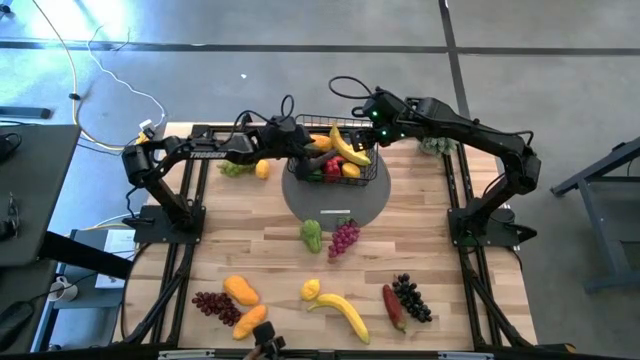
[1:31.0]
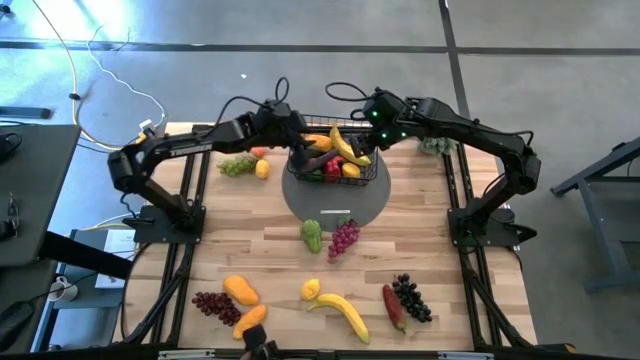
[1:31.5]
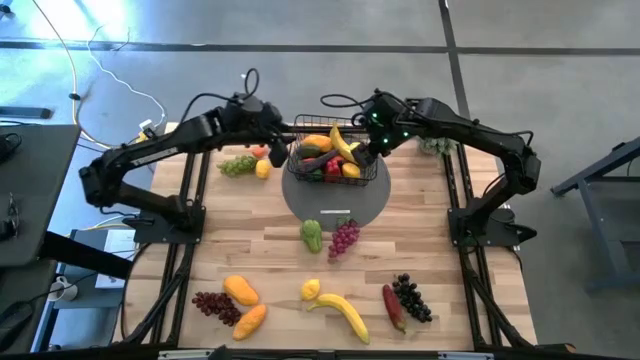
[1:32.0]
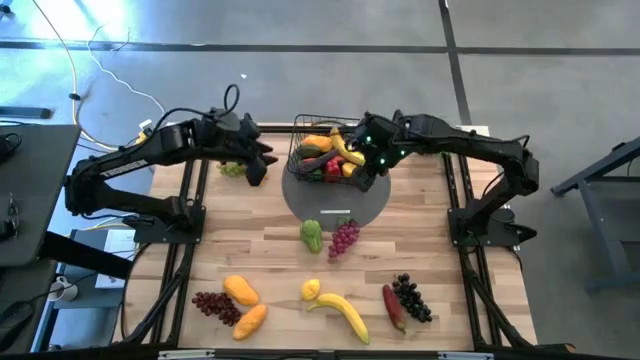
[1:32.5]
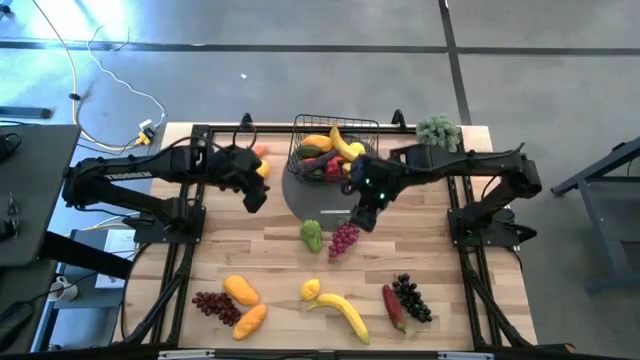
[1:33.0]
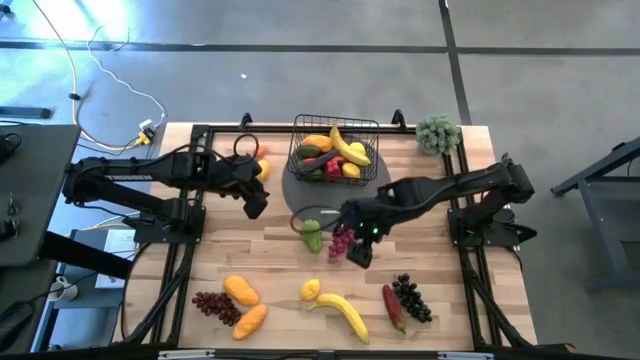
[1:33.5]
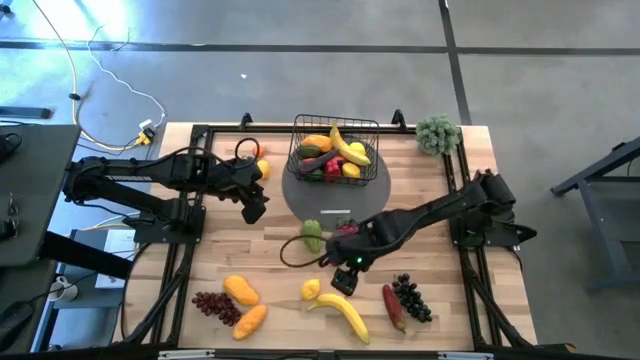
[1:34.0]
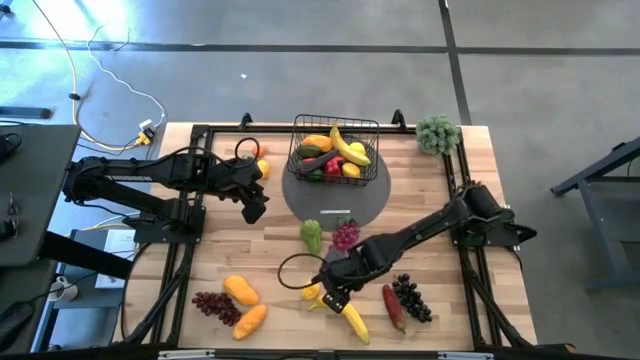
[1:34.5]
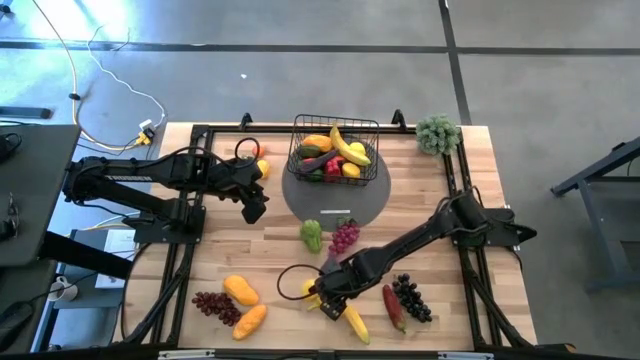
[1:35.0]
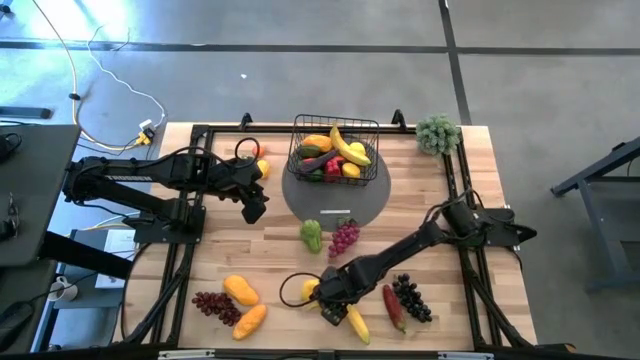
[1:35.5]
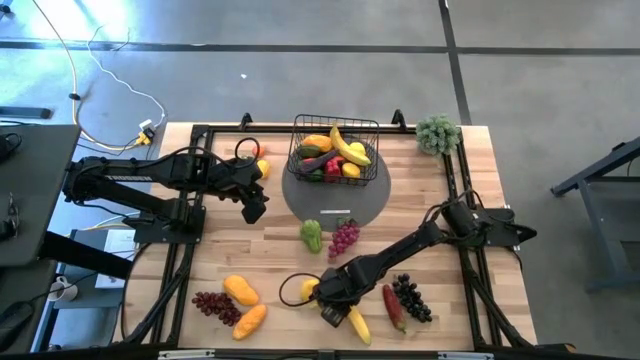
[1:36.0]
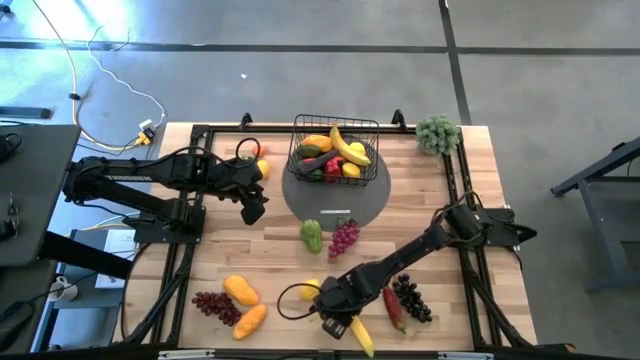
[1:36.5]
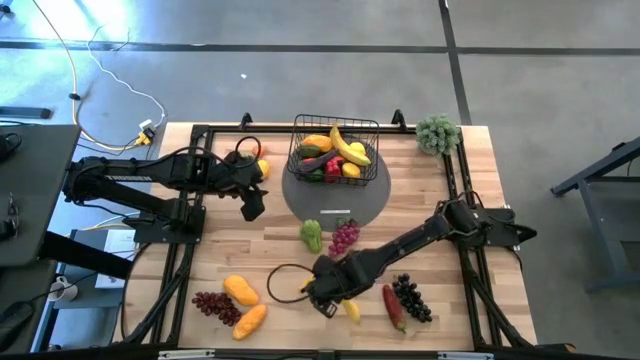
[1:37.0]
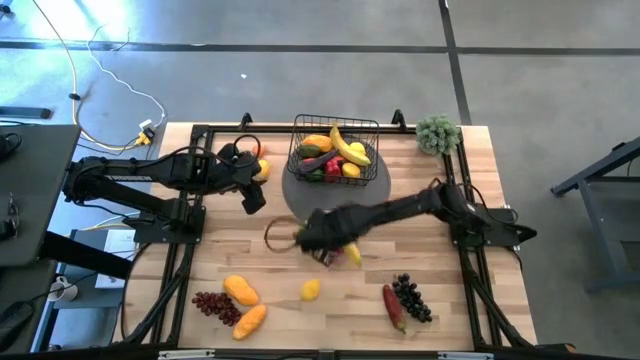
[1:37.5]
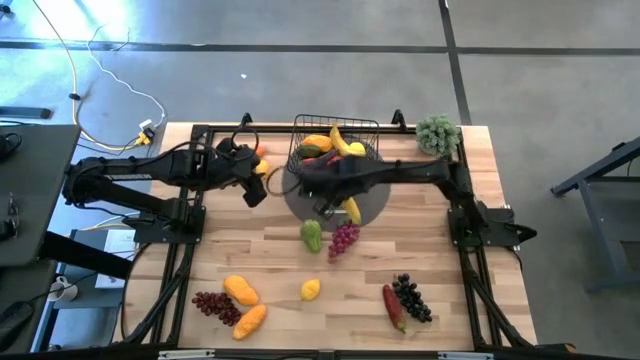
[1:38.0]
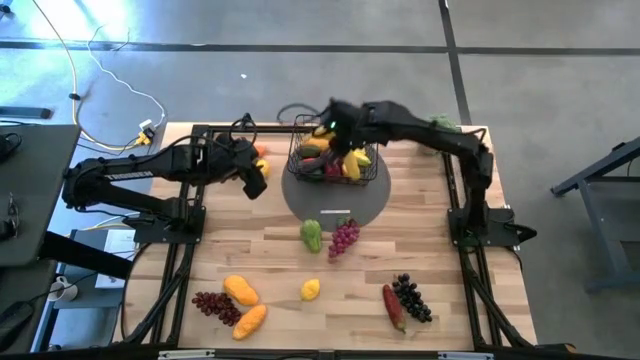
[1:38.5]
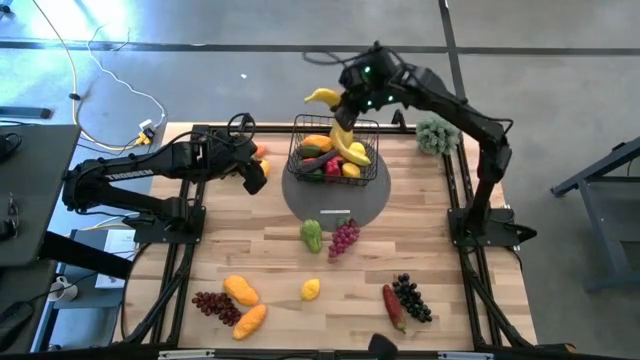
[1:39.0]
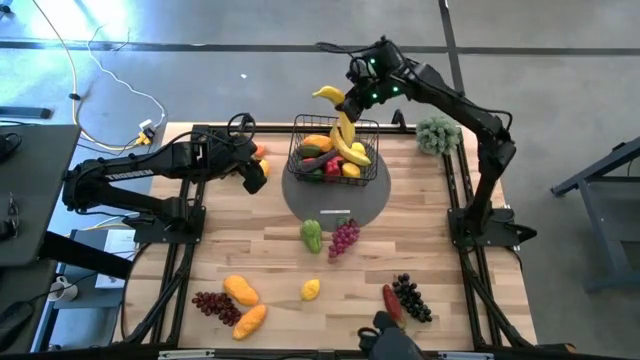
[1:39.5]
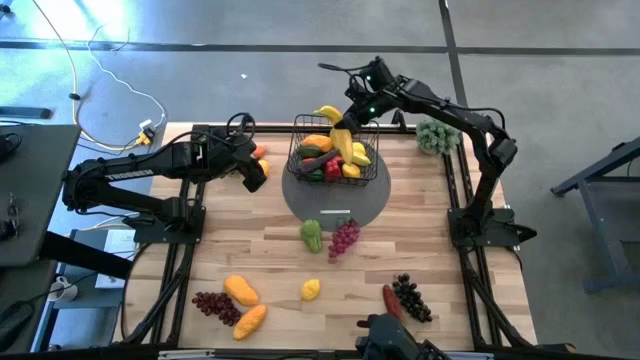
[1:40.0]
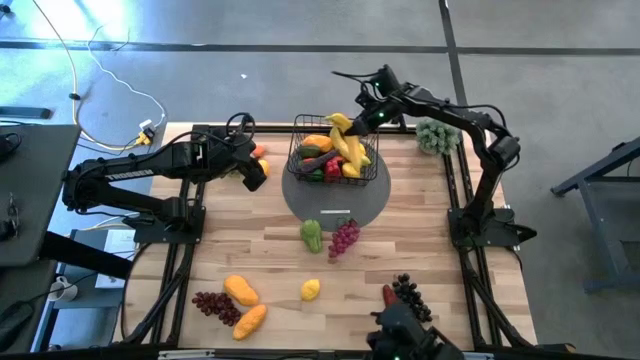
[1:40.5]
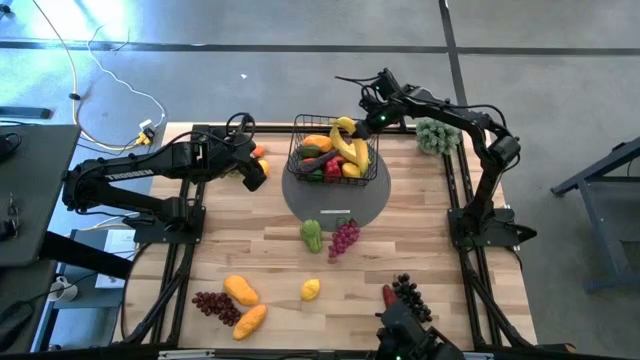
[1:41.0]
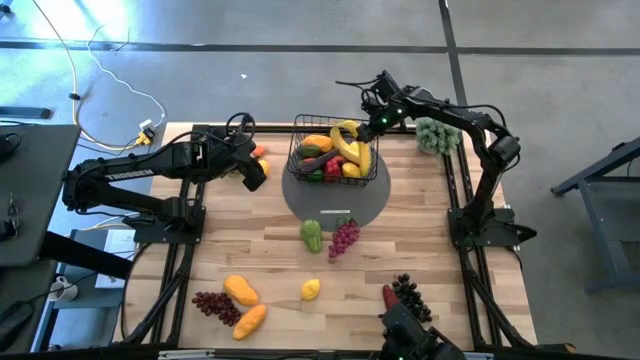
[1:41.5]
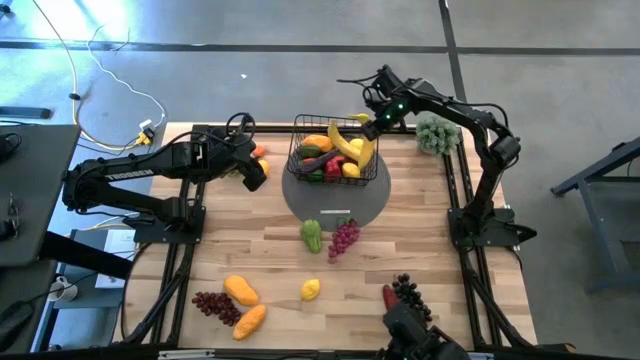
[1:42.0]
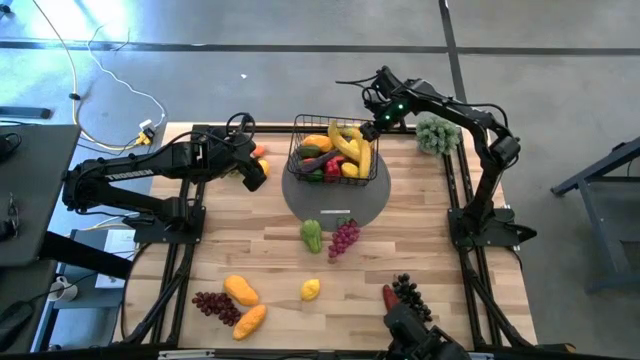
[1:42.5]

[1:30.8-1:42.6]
Task: Build produce basket
Put the yellow banana into the wire basket

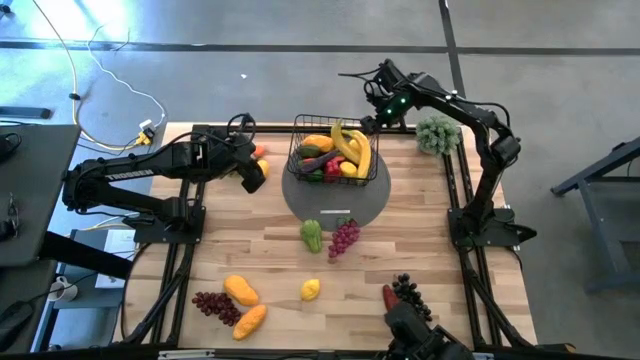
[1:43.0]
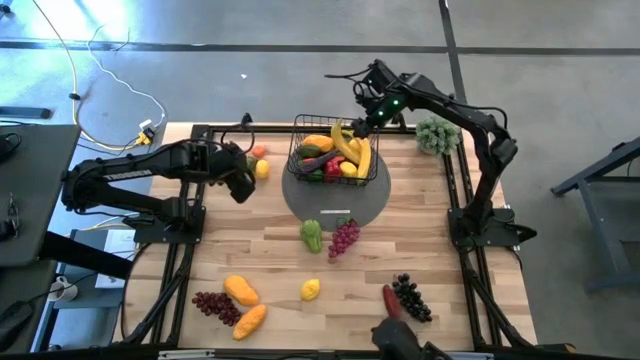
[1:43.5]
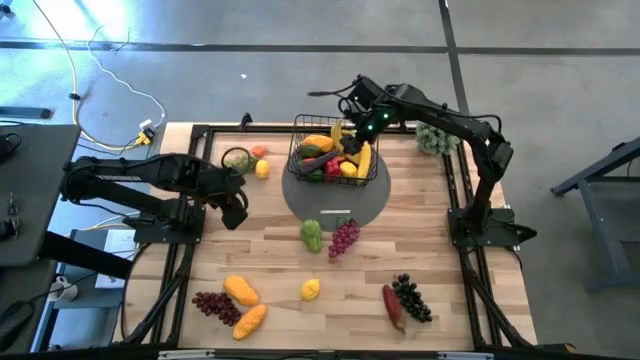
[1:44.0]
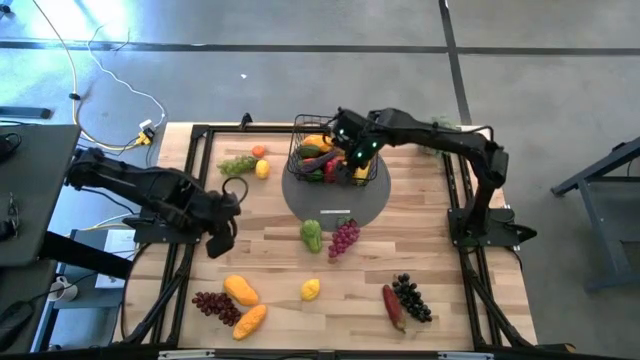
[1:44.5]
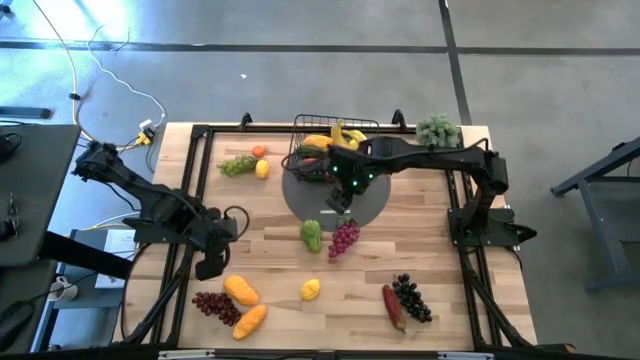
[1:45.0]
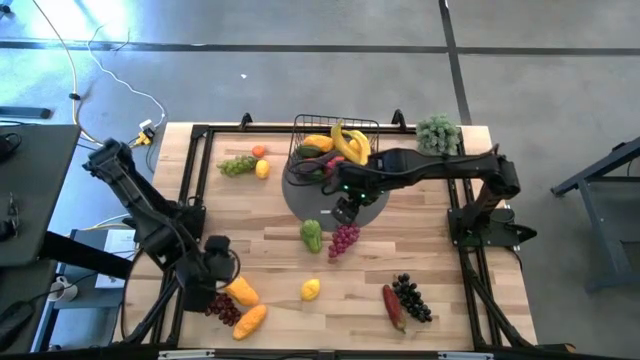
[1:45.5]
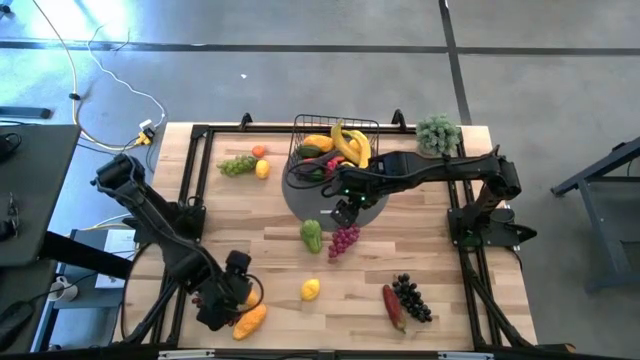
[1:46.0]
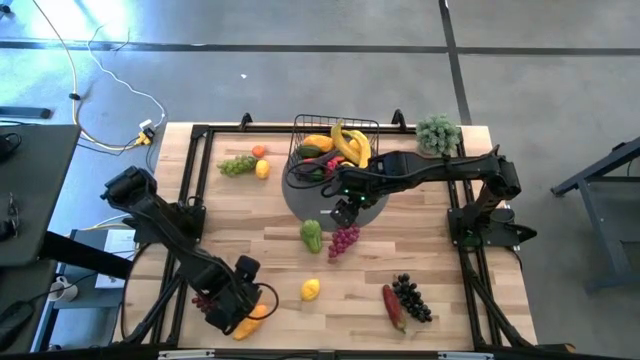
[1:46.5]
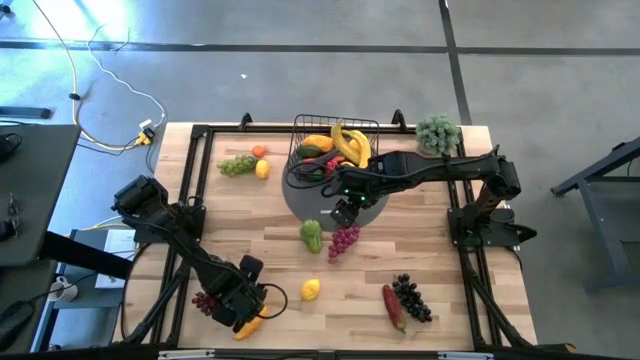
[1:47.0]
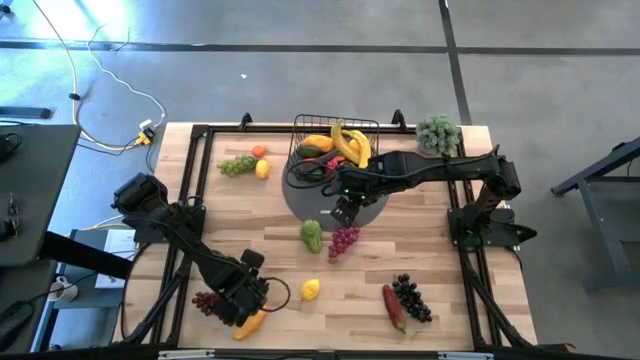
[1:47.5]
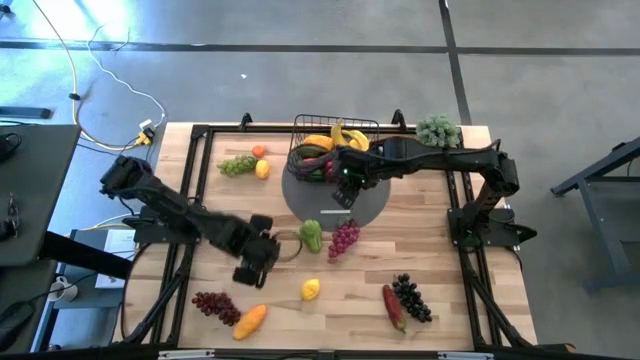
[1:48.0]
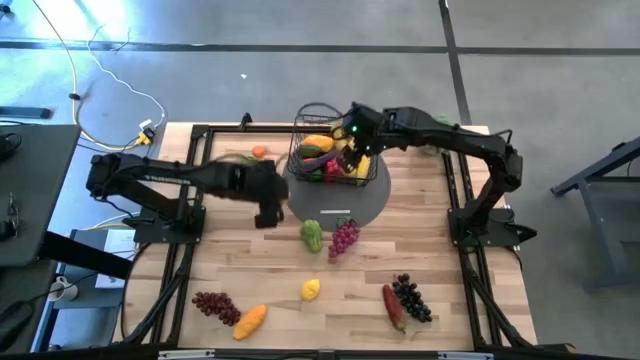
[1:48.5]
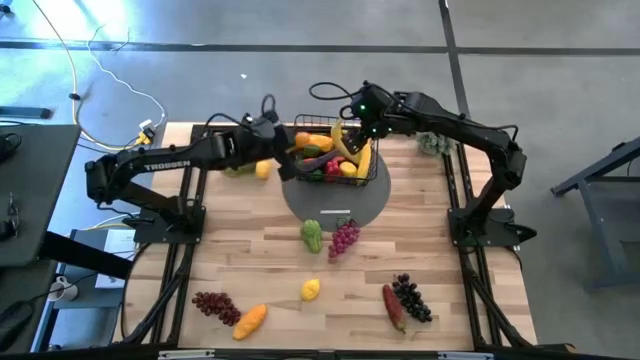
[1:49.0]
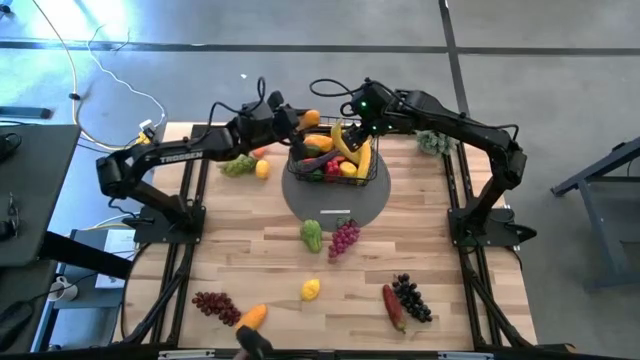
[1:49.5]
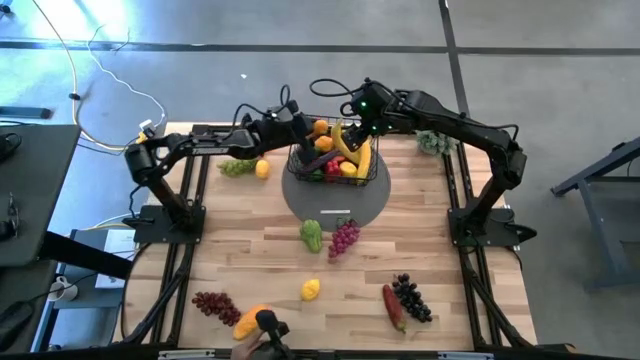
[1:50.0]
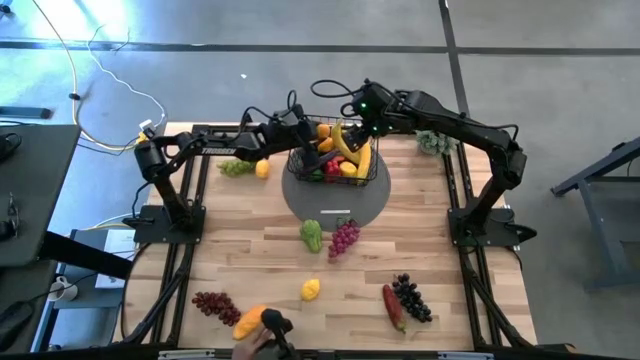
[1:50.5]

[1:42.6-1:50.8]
Put the yellow mango into the wire basket
